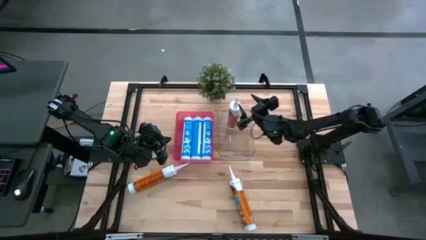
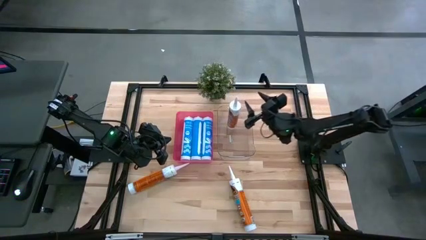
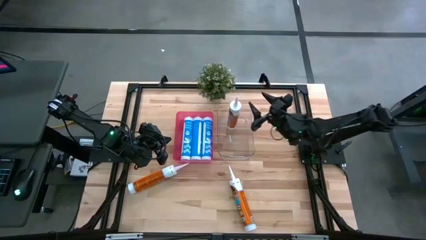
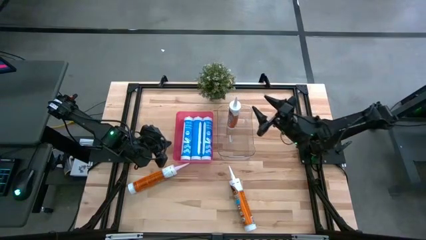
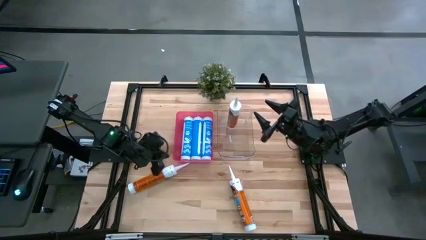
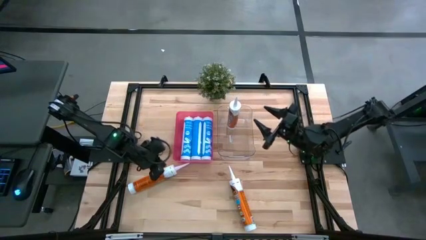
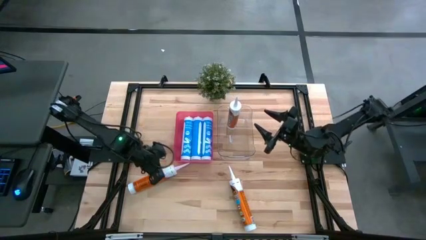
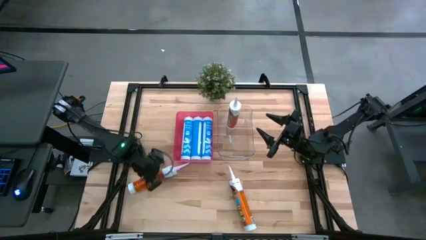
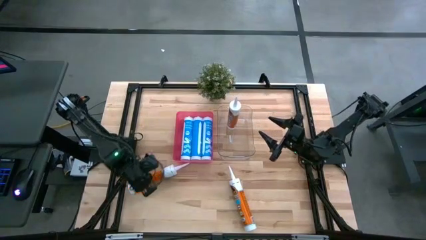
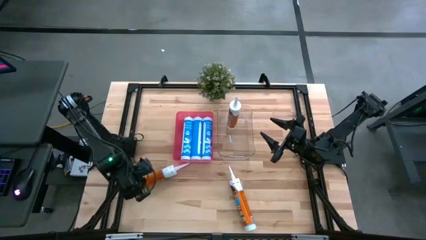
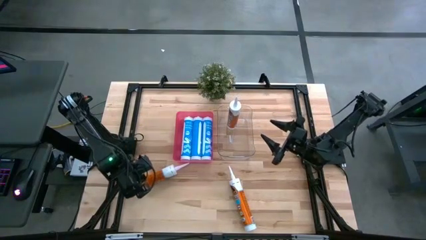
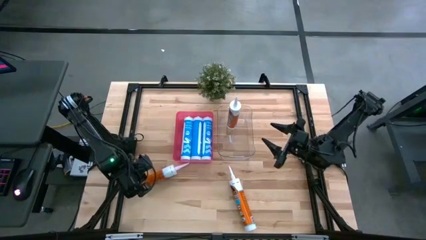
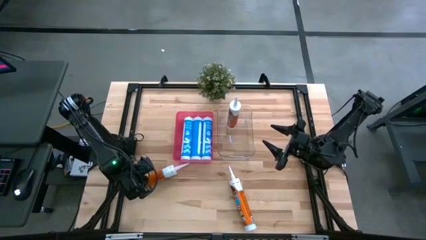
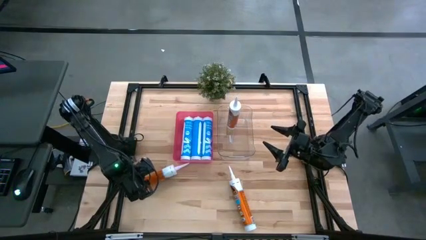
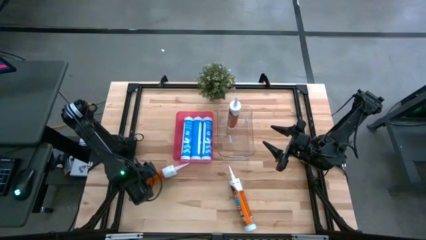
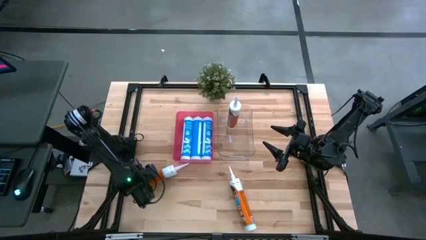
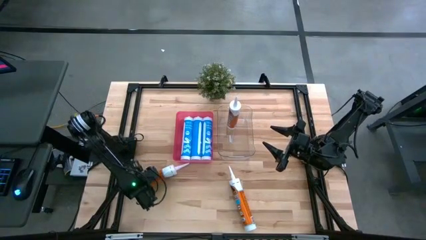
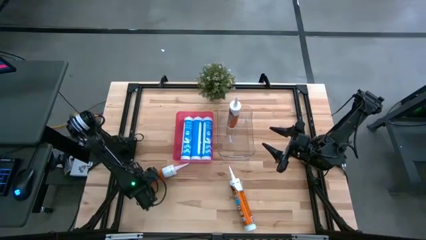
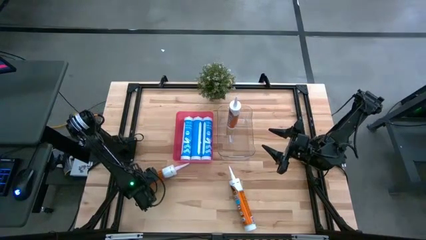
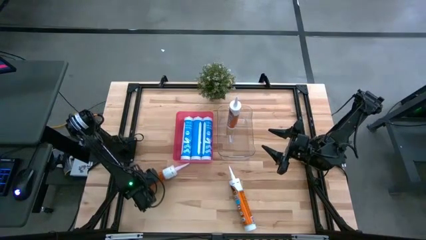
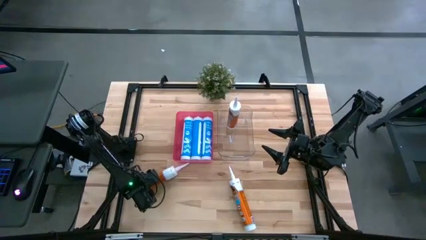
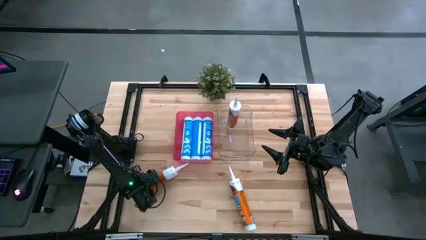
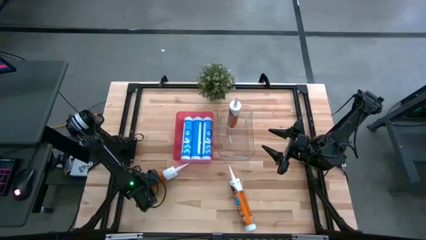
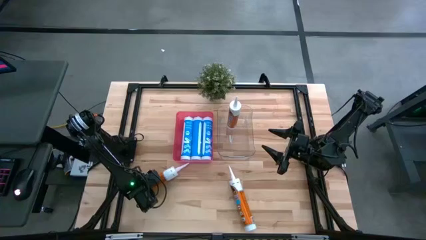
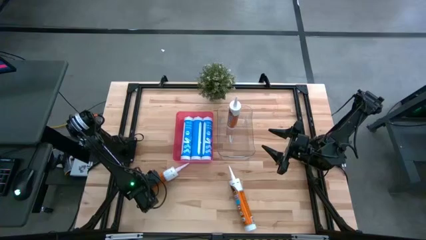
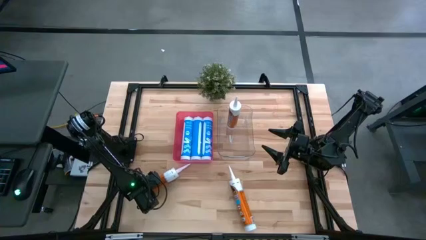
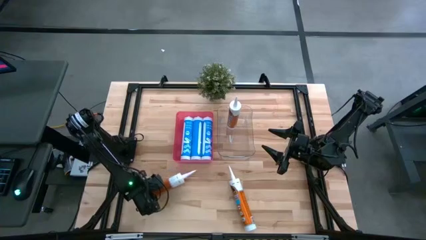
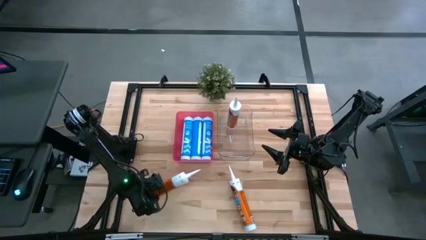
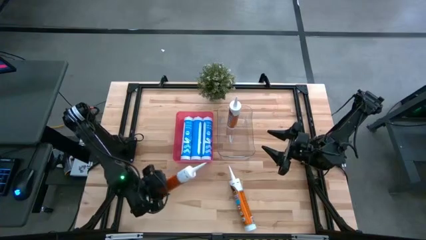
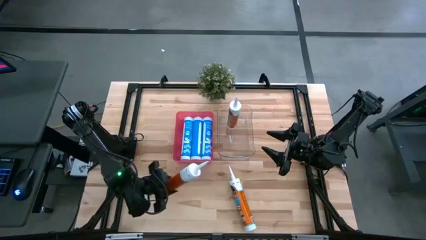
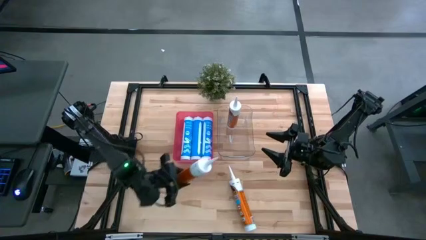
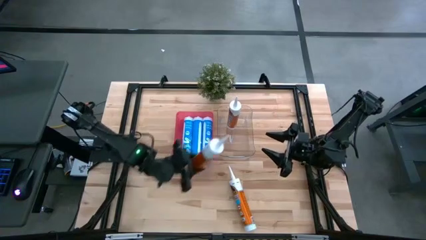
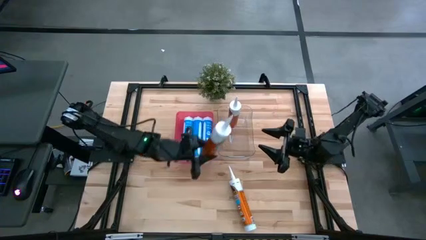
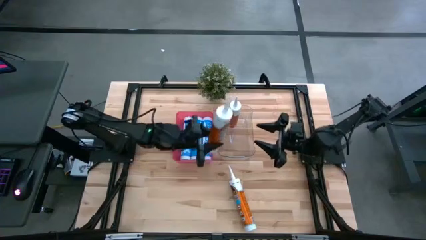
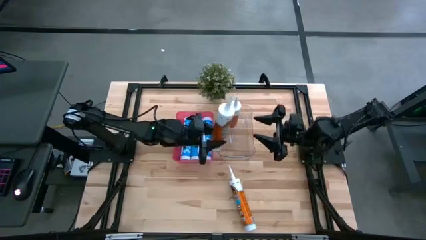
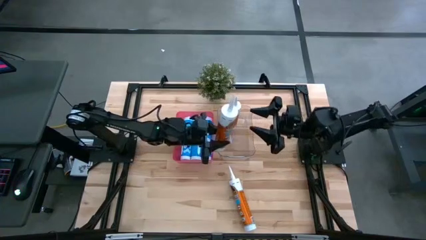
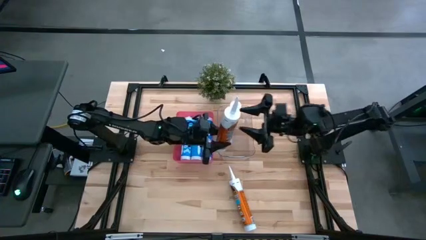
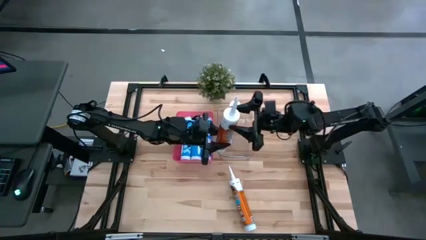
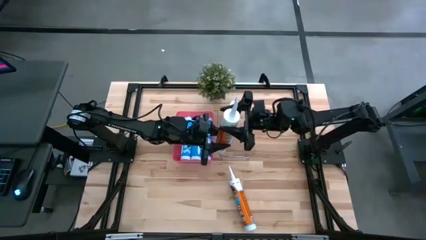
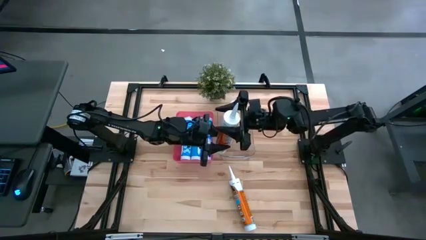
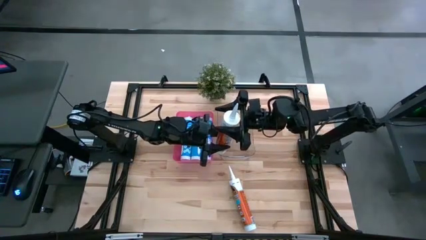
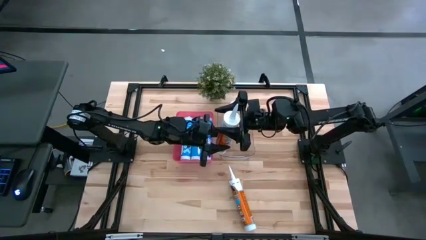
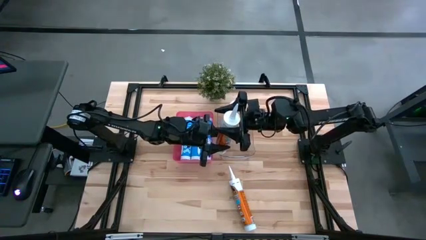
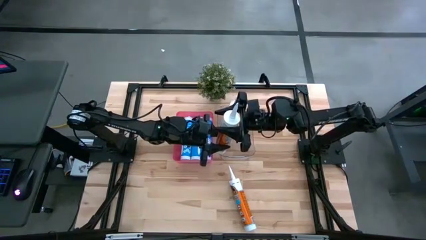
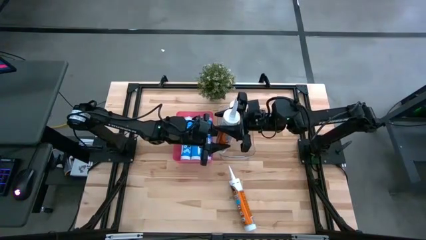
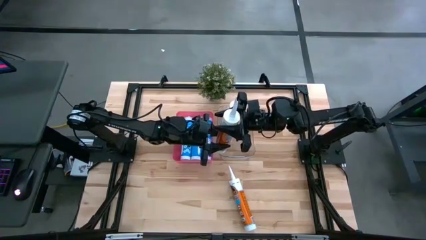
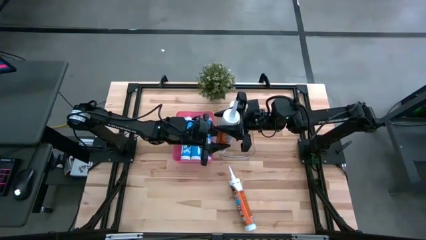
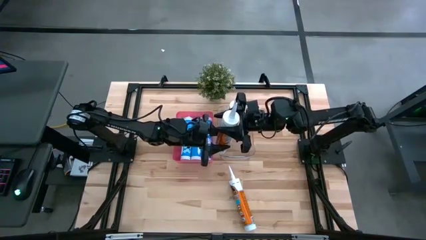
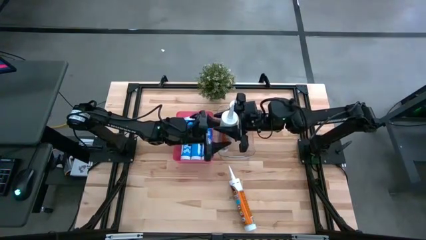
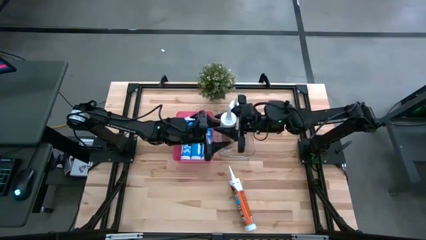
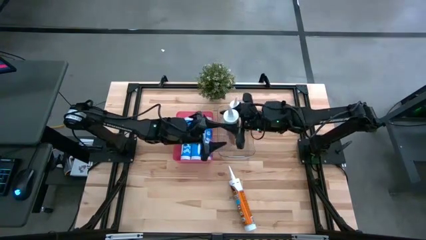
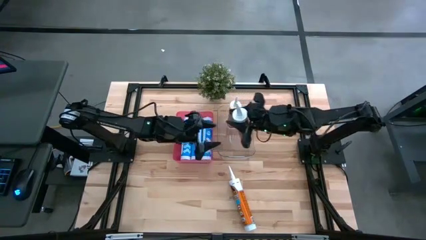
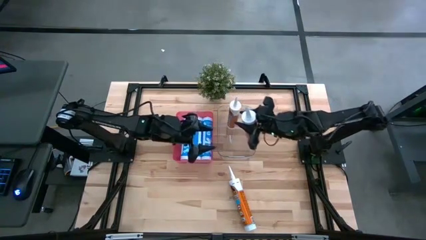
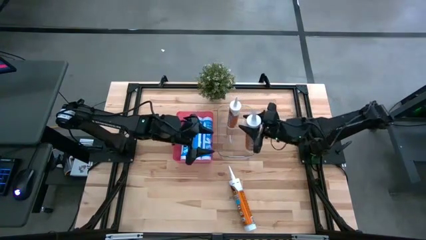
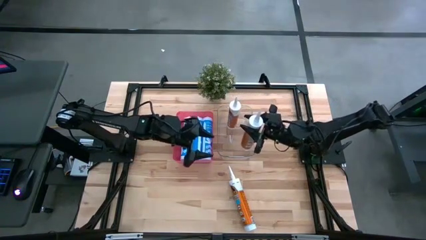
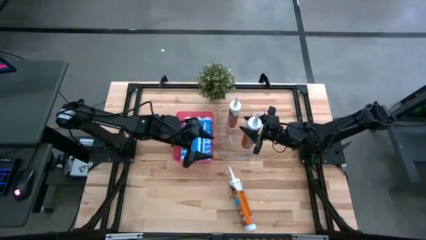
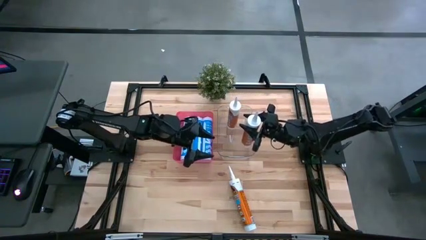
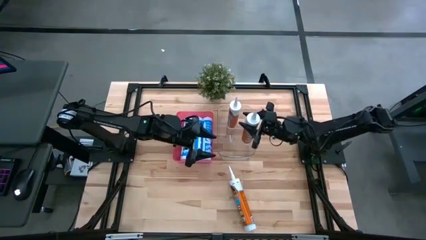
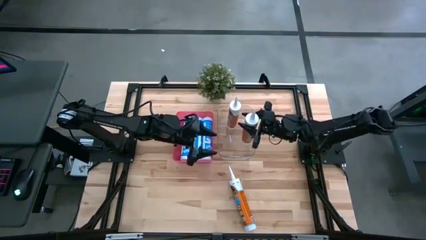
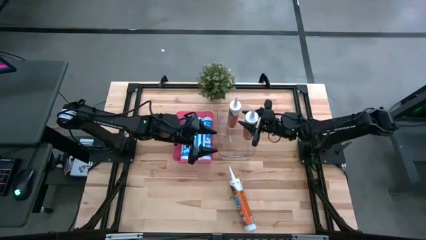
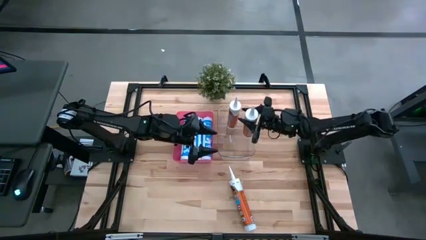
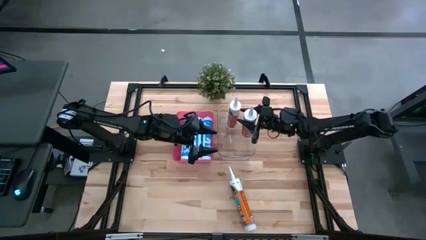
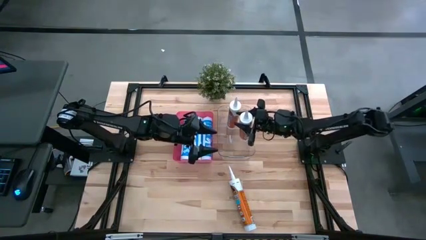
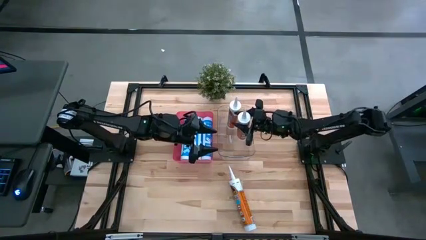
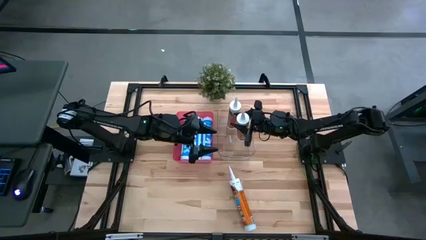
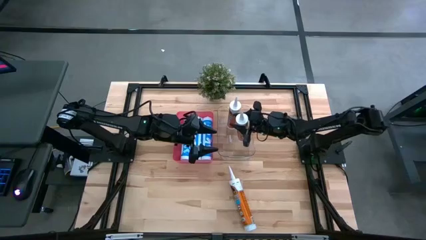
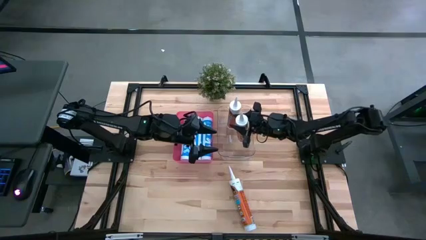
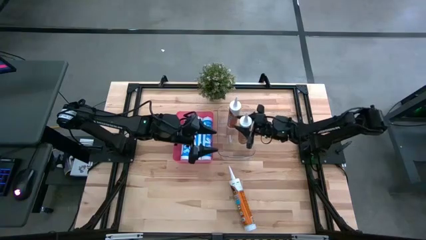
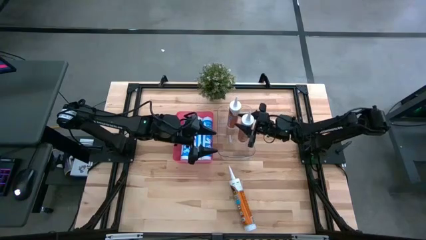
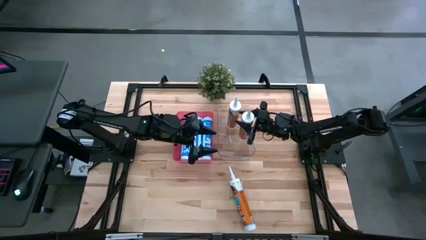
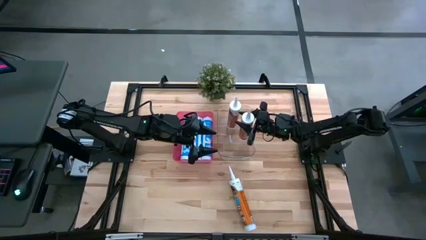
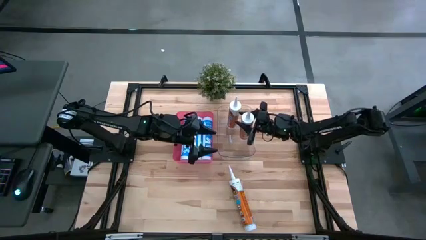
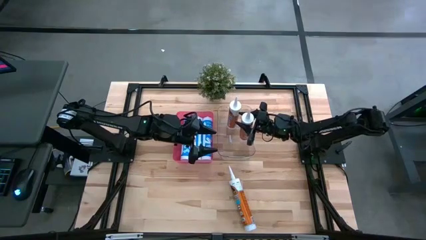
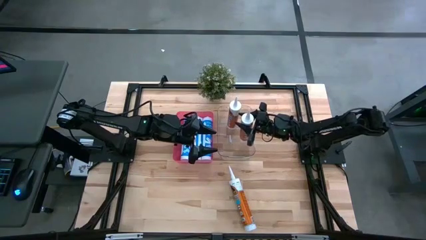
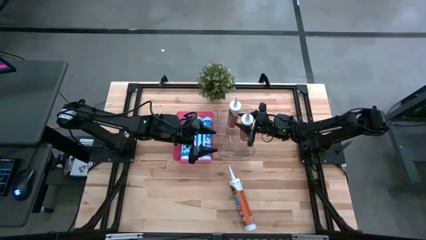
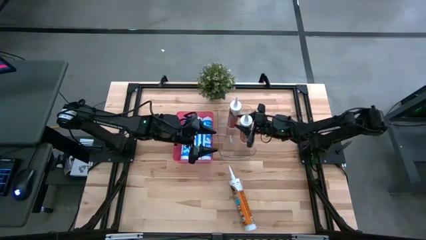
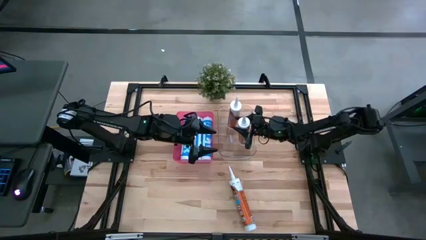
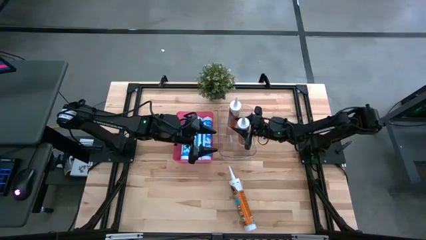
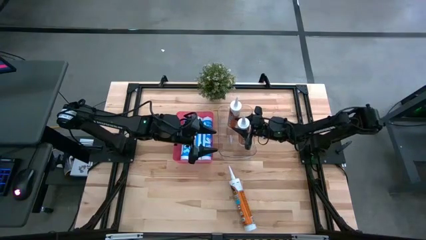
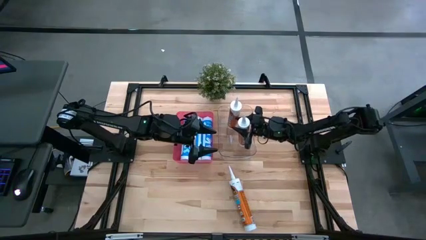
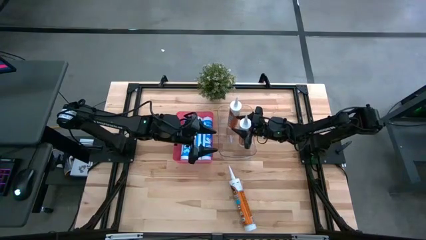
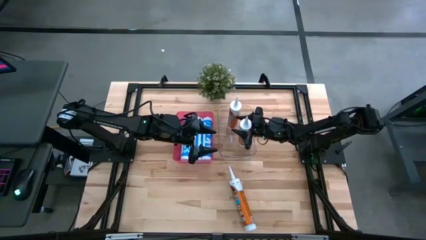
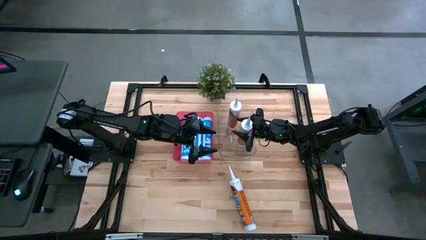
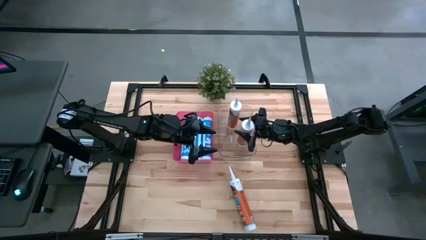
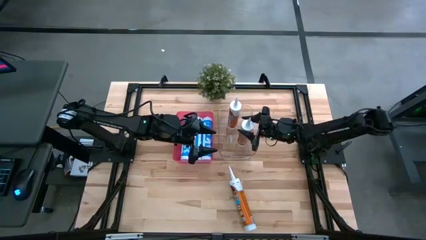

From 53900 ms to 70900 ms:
Task: Pick & place silicon tubes, Sealant and Lysol wipes
Put the left orange sealant into the transparent bin
